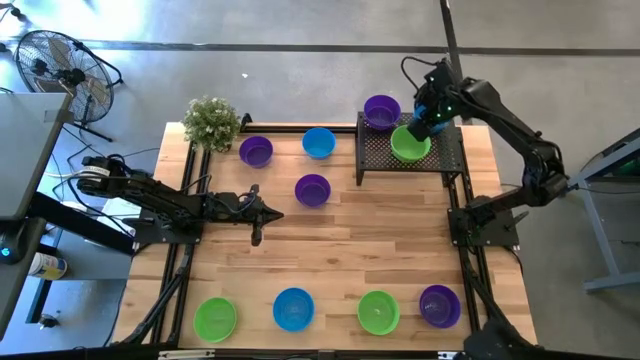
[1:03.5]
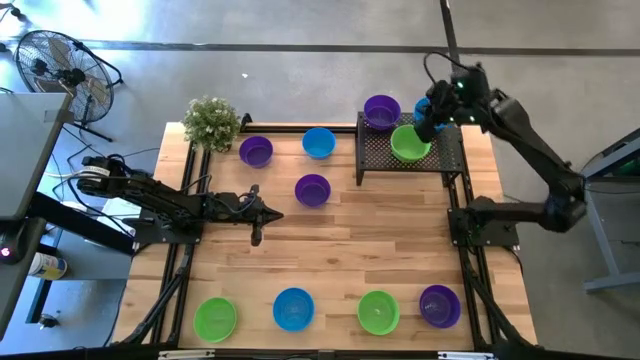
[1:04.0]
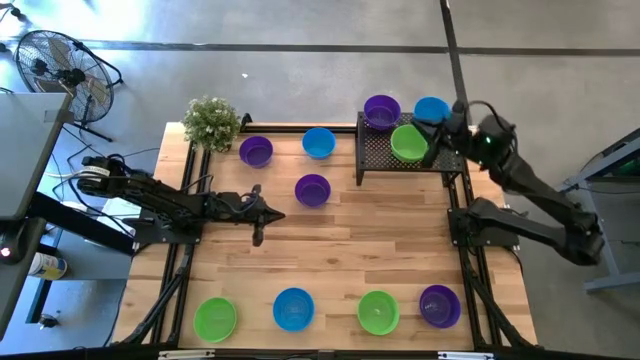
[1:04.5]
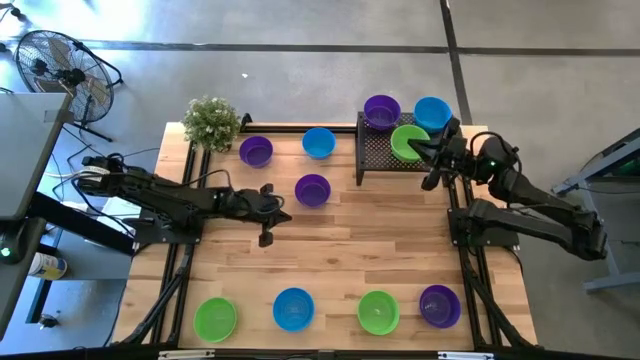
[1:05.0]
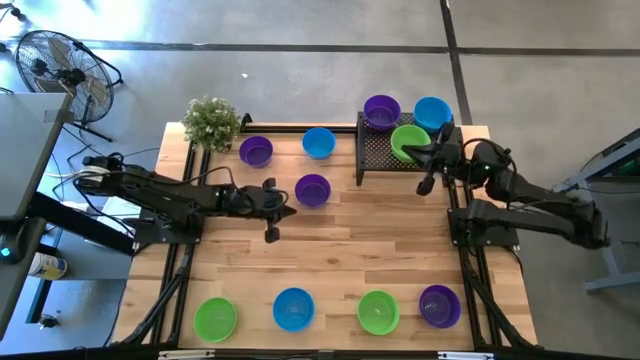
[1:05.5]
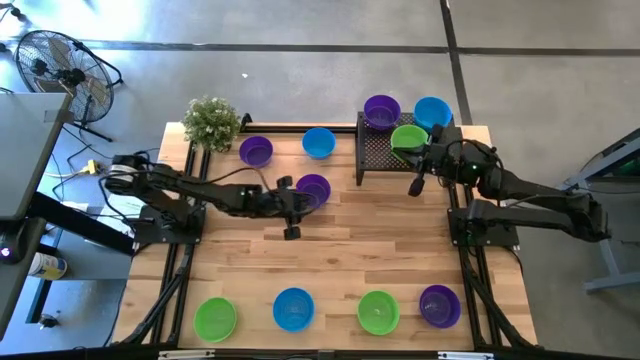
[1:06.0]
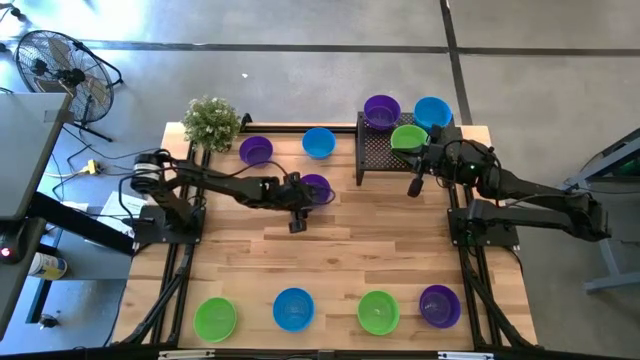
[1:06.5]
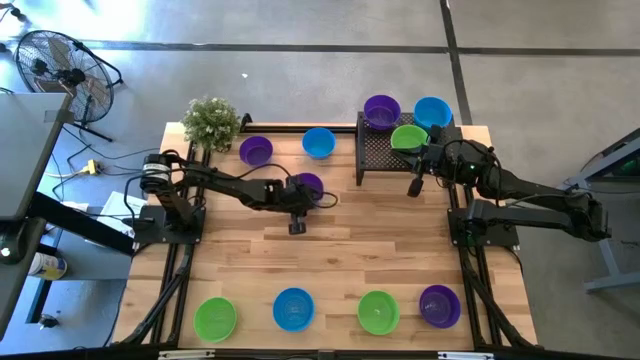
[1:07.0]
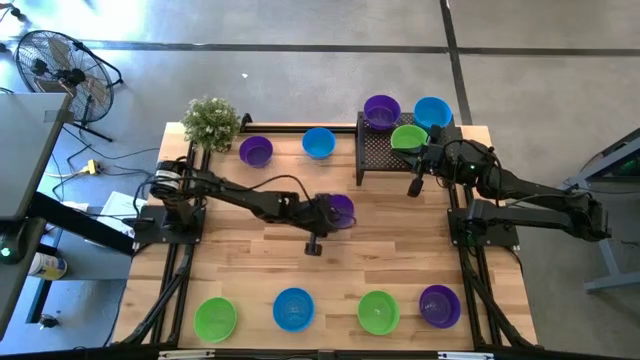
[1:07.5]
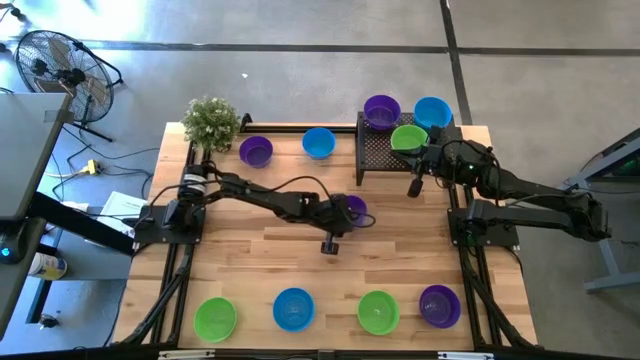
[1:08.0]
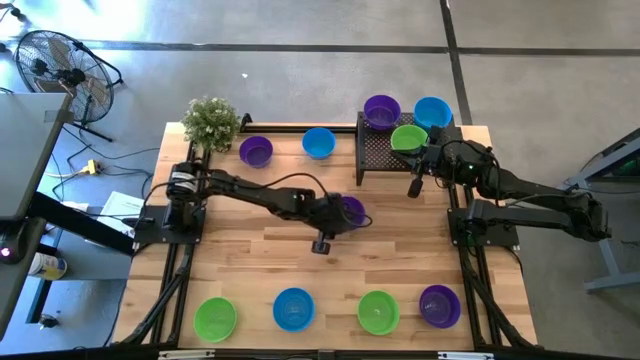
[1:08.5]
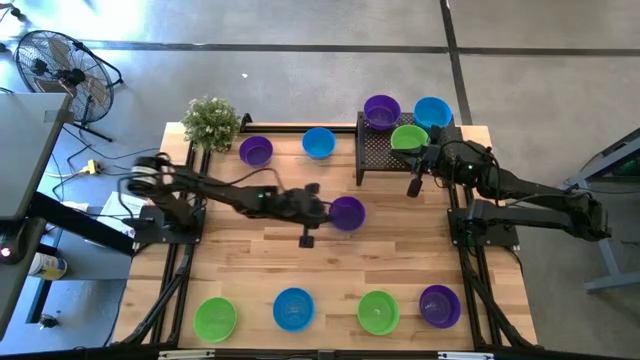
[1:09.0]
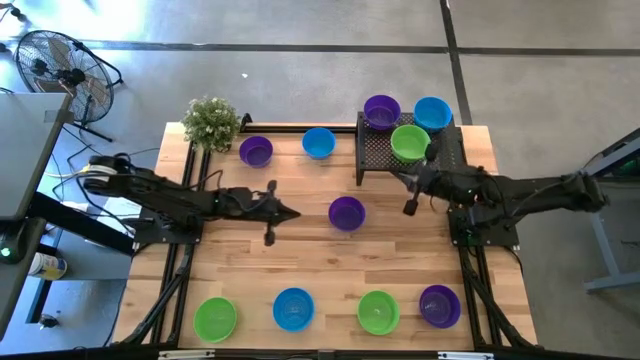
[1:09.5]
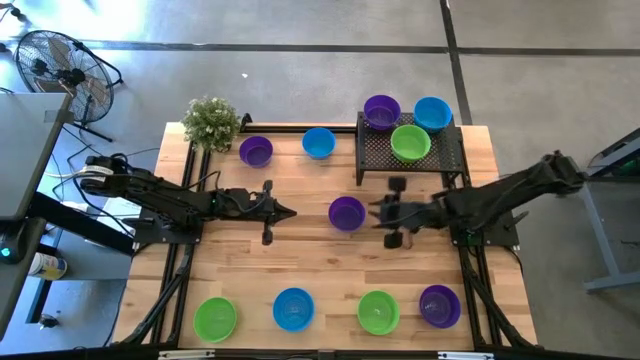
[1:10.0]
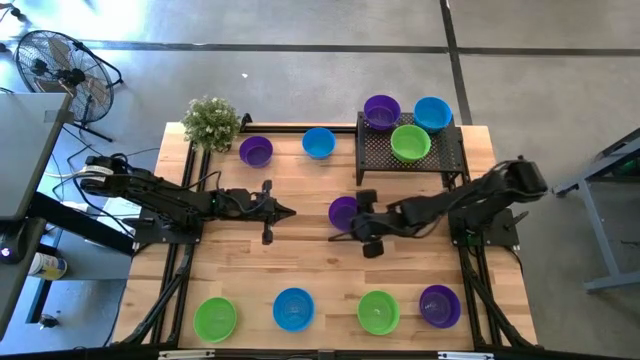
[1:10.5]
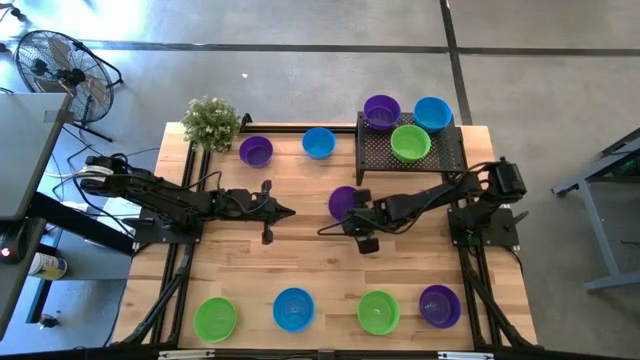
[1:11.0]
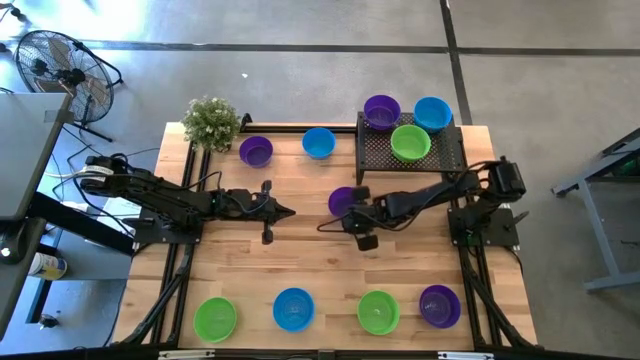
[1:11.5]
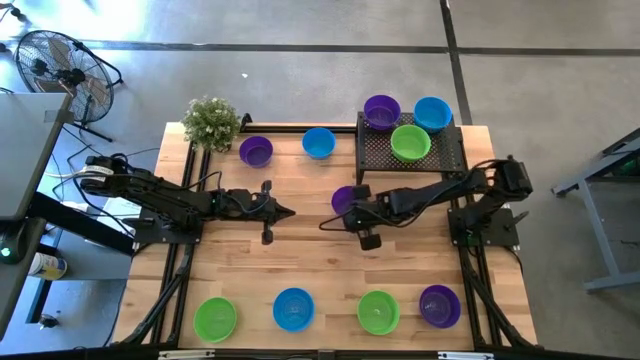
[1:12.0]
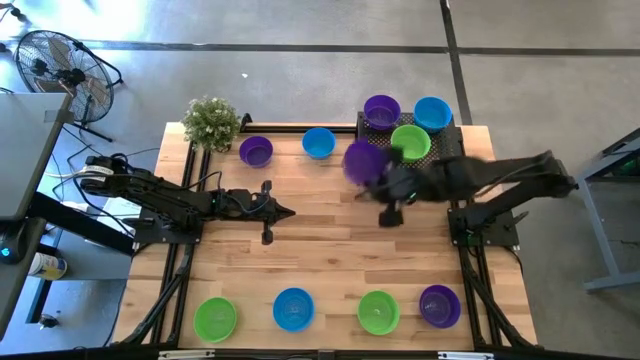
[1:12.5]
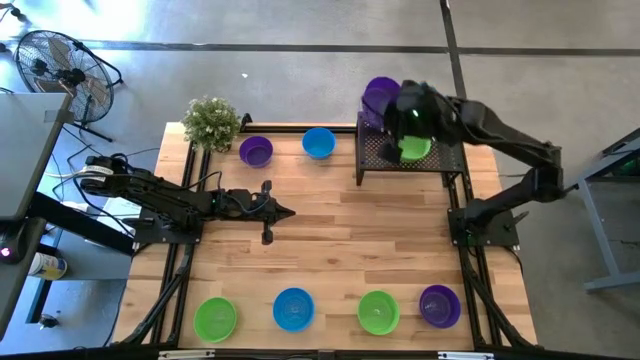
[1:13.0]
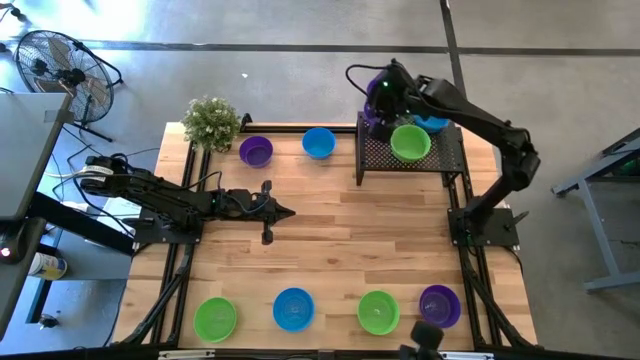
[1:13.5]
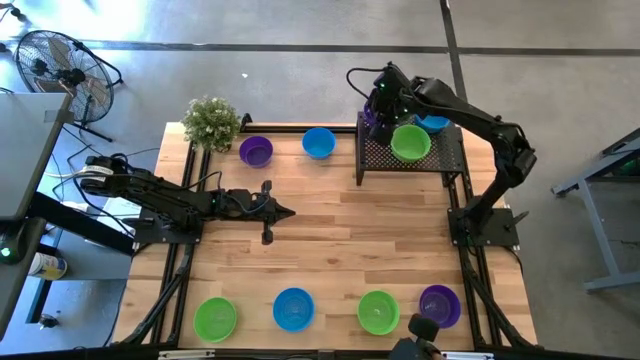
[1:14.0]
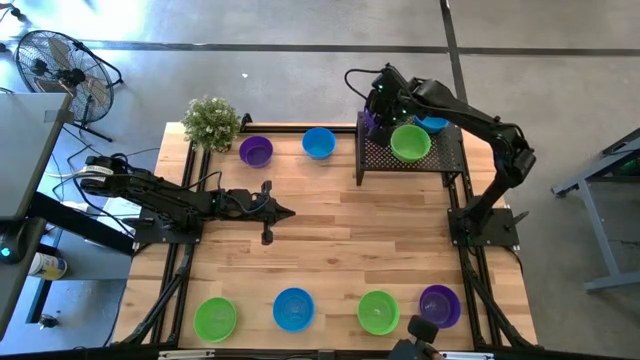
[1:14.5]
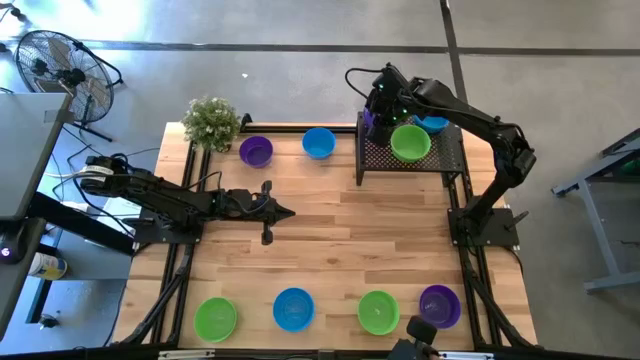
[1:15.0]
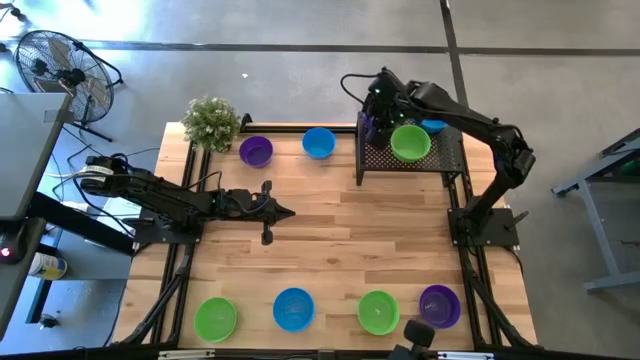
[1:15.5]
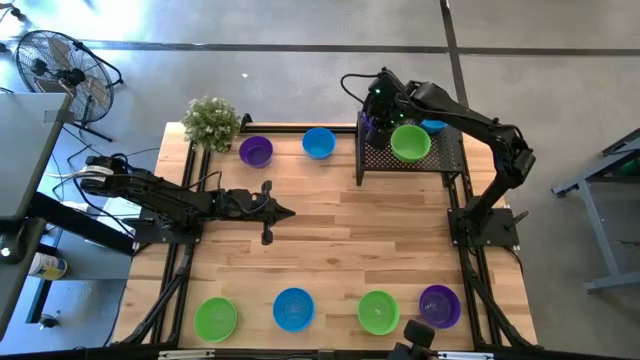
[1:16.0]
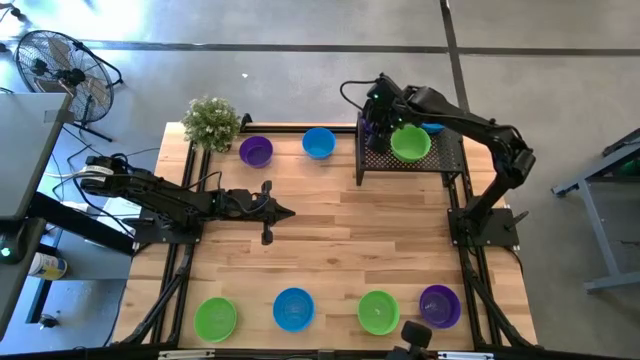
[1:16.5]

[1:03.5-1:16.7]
Task: Pick & Place Mini bowls
Stack the violet bowl on the other violet bowl on the shelf

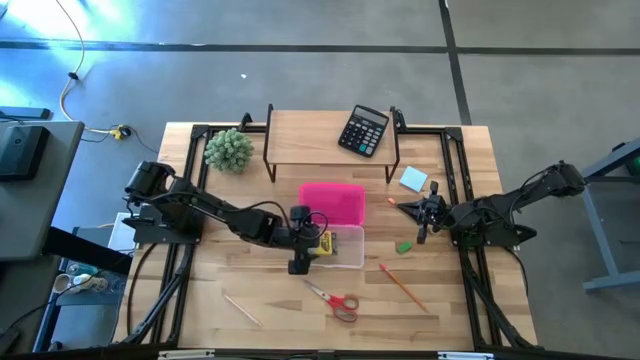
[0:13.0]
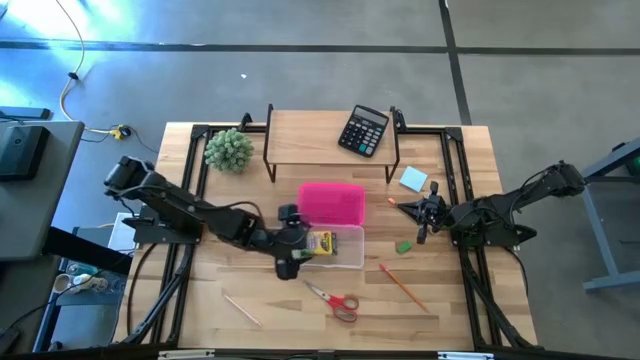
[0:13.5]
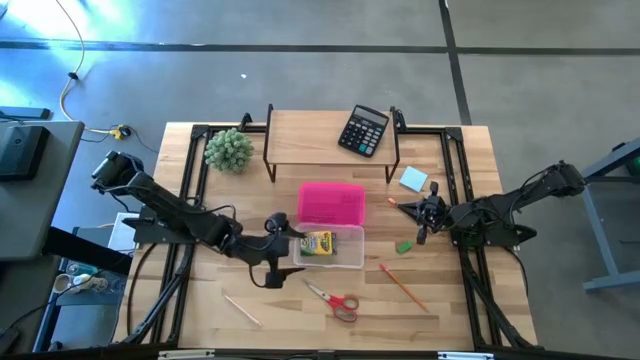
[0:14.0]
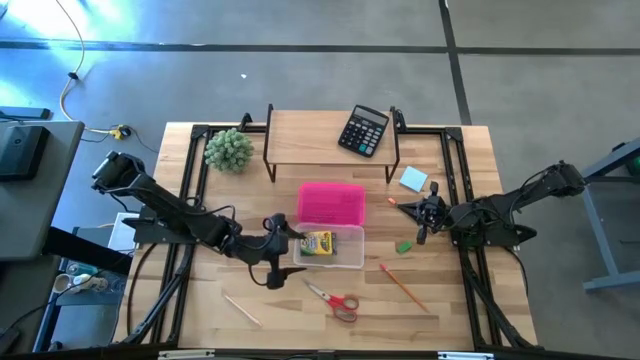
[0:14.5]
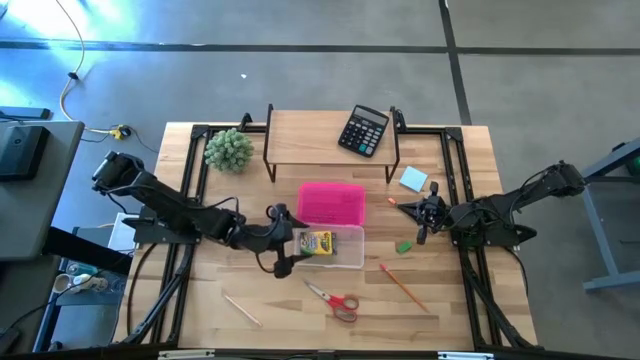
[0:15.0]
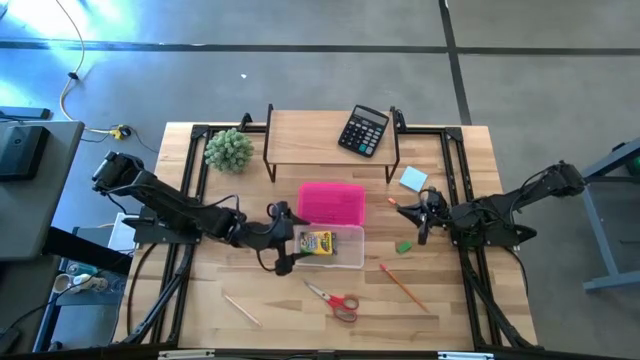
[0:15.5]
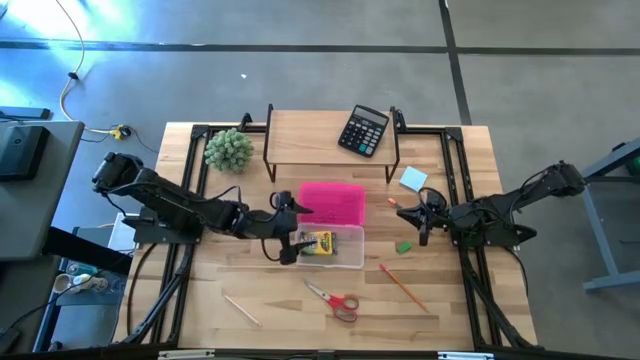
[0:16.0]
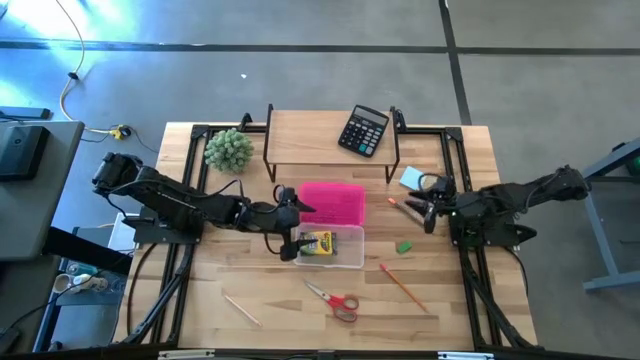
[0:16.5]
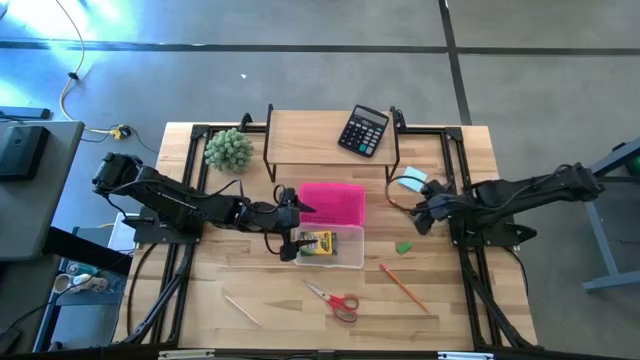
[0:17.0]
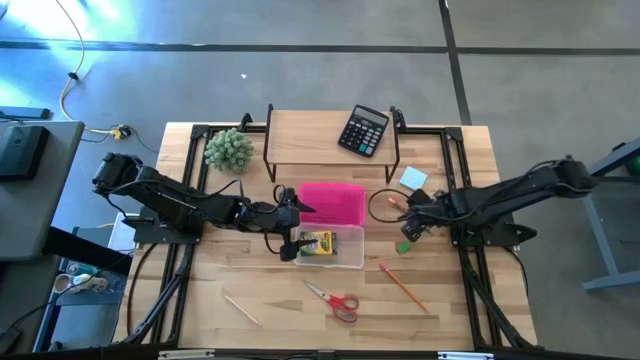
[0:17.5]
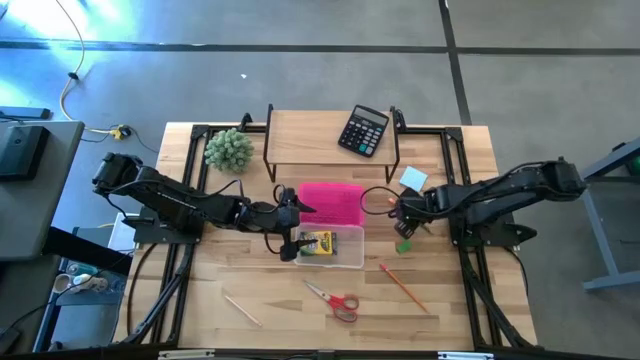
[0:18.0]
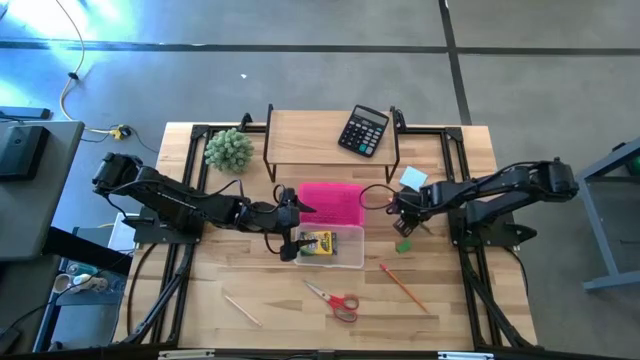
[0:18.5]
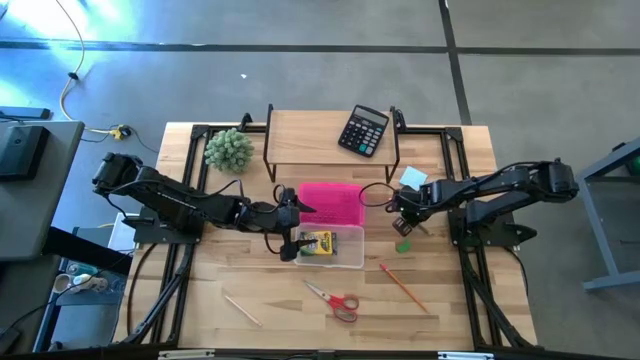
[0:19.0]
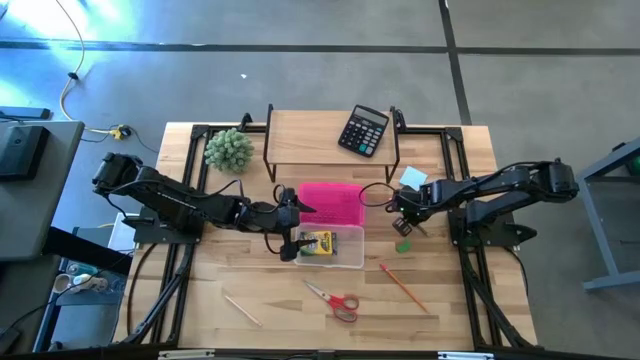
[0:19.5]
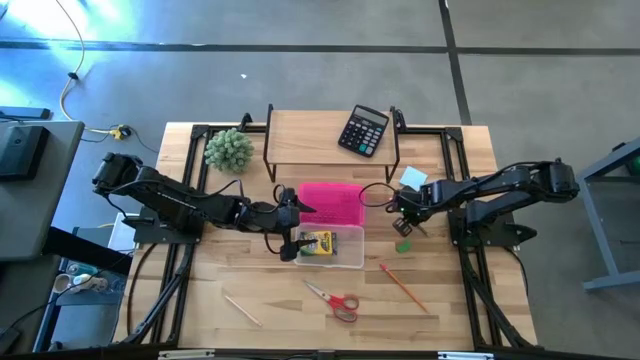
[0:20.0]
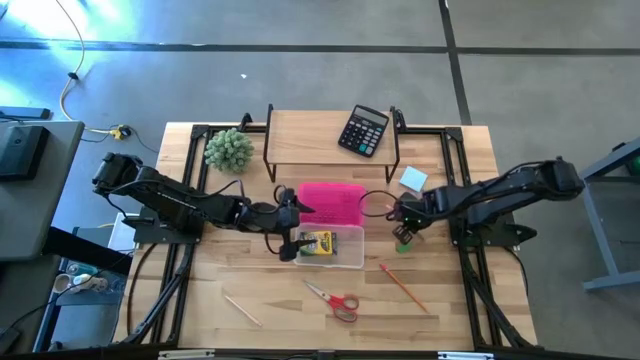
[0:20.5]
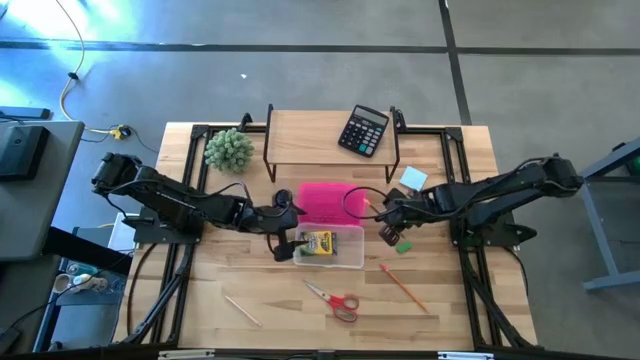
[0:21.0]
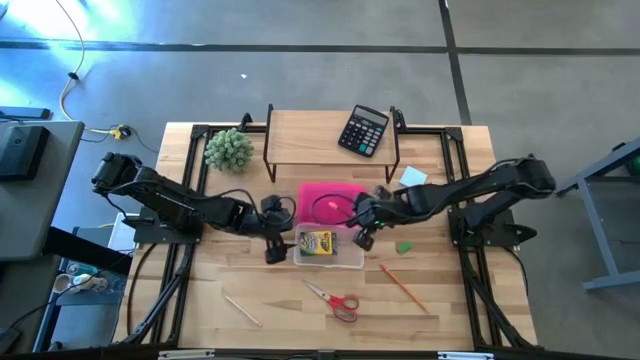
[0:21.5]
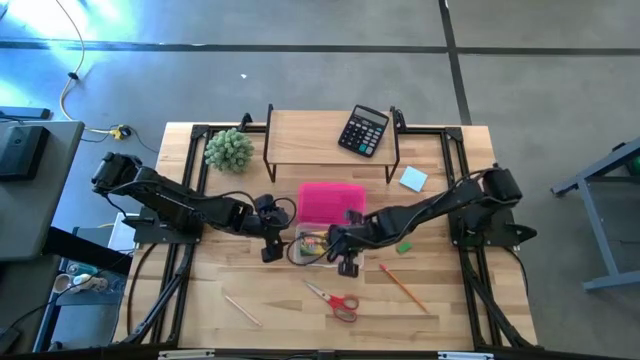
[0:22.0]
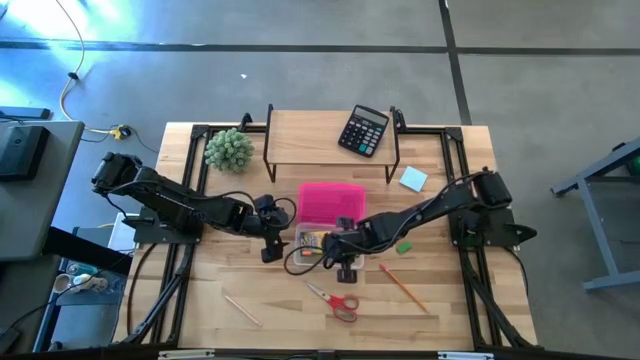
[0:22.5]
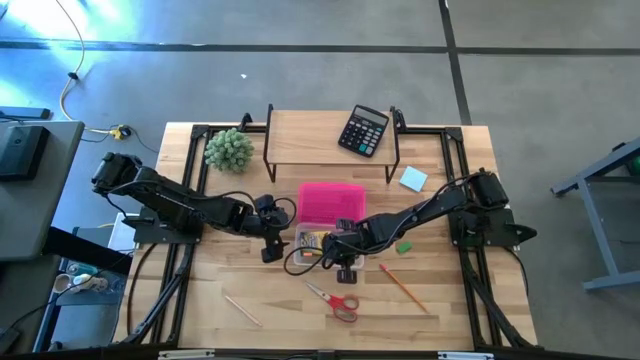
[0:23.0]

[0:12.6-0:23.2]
Task: Pack school essentials
Put the black pencil into the pink supply box
